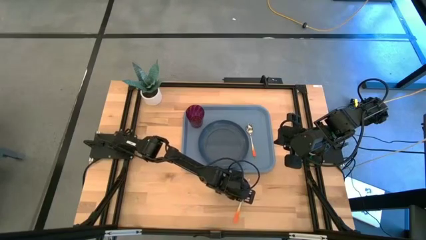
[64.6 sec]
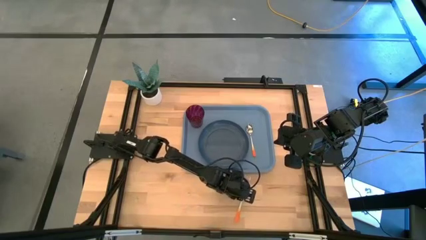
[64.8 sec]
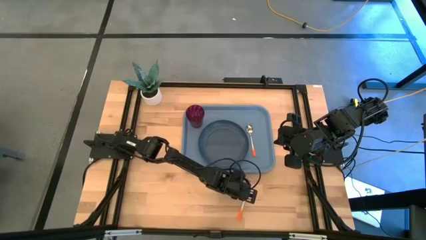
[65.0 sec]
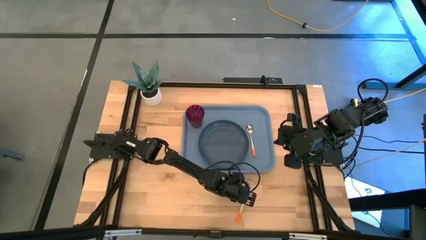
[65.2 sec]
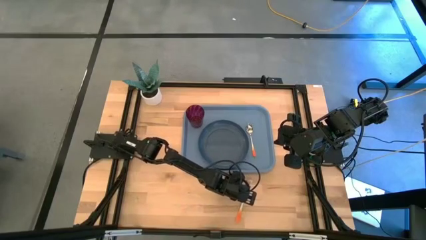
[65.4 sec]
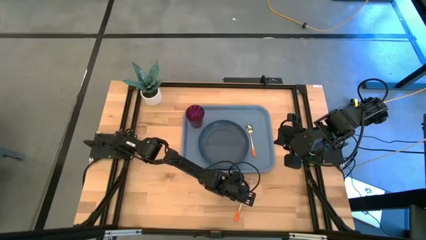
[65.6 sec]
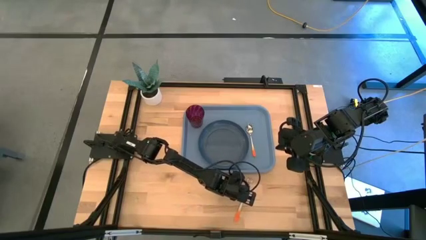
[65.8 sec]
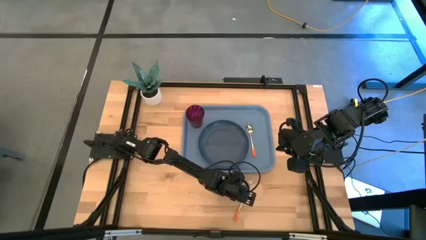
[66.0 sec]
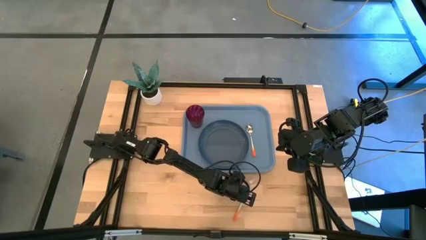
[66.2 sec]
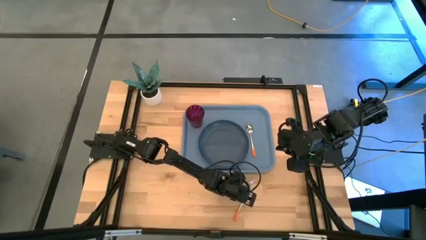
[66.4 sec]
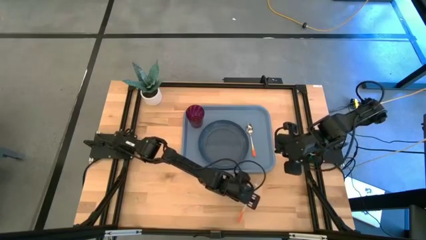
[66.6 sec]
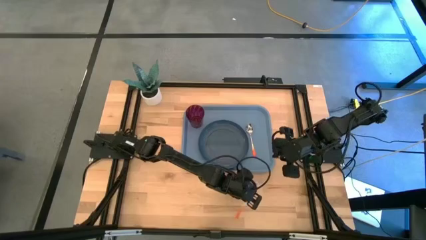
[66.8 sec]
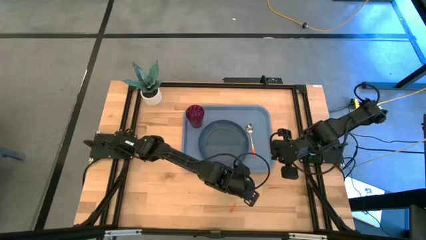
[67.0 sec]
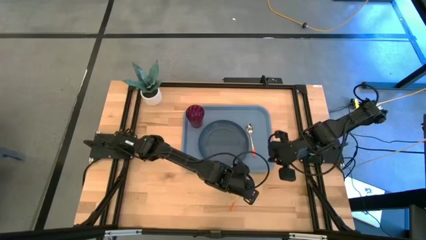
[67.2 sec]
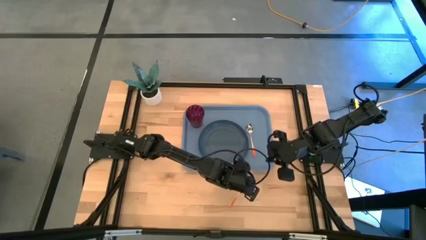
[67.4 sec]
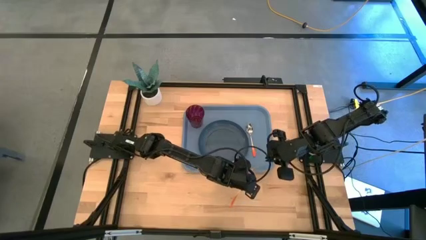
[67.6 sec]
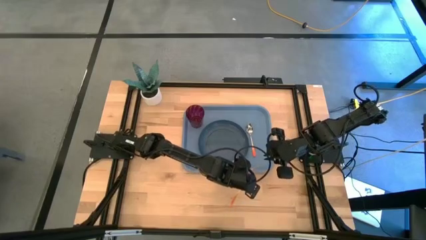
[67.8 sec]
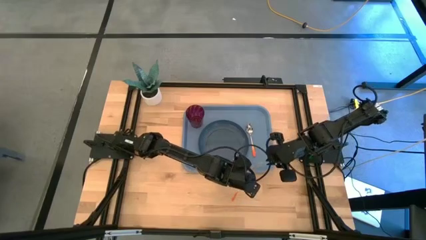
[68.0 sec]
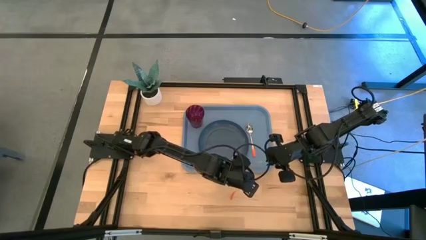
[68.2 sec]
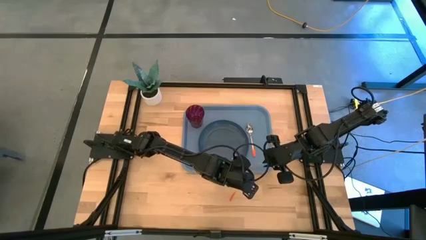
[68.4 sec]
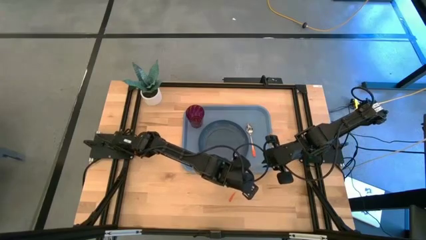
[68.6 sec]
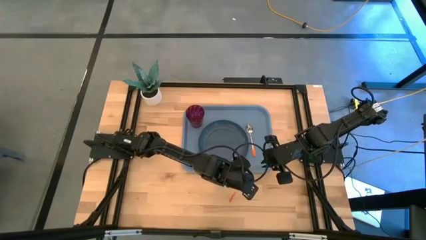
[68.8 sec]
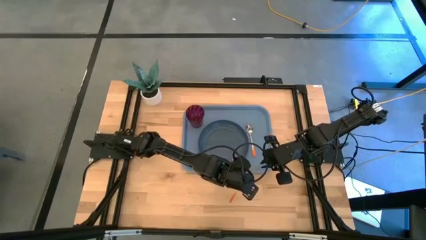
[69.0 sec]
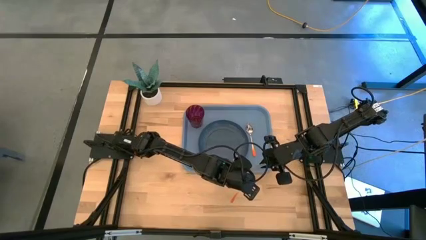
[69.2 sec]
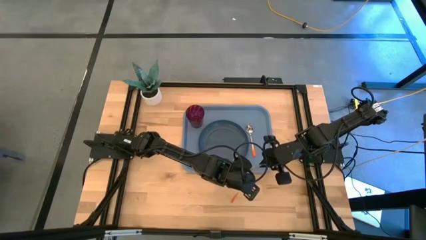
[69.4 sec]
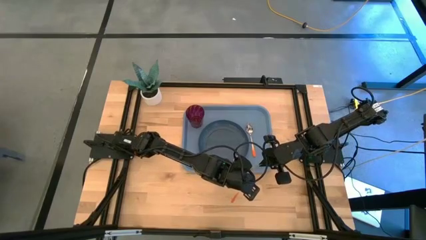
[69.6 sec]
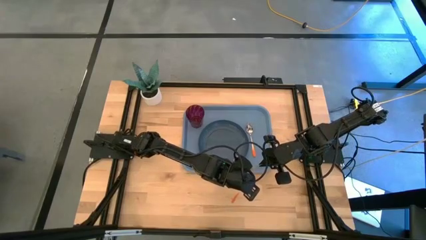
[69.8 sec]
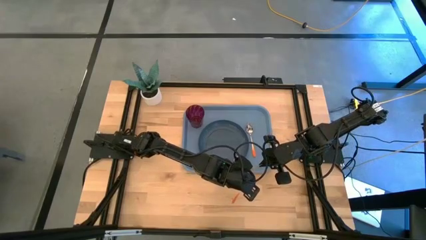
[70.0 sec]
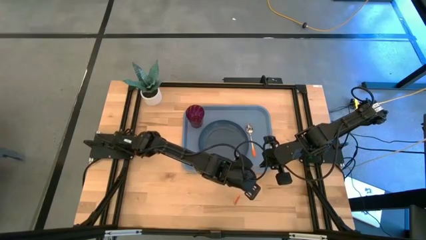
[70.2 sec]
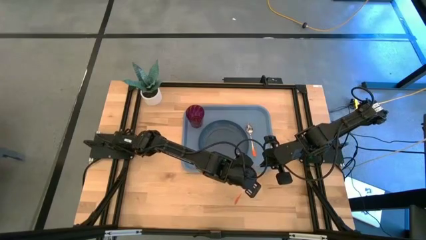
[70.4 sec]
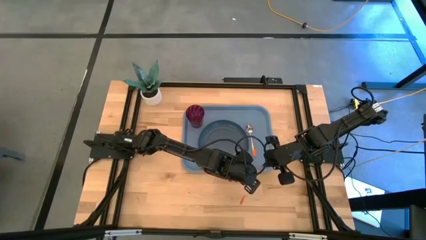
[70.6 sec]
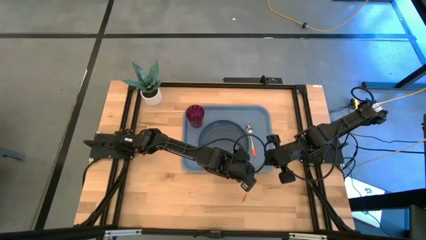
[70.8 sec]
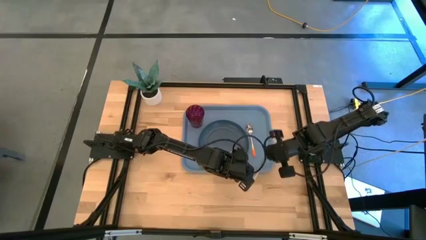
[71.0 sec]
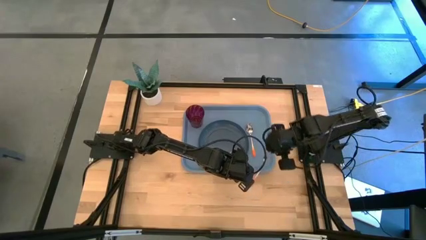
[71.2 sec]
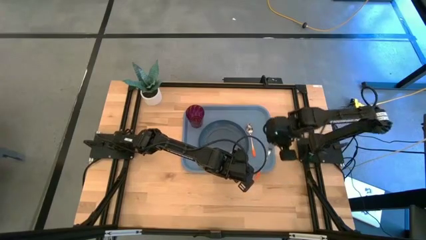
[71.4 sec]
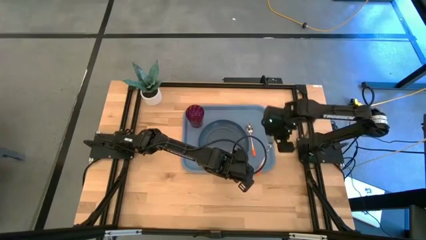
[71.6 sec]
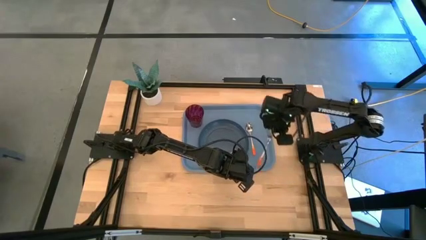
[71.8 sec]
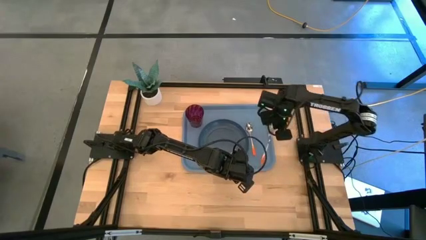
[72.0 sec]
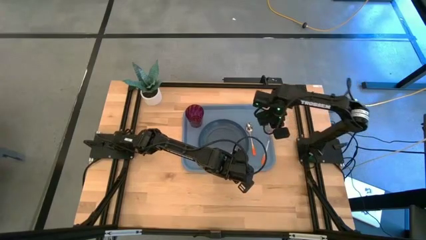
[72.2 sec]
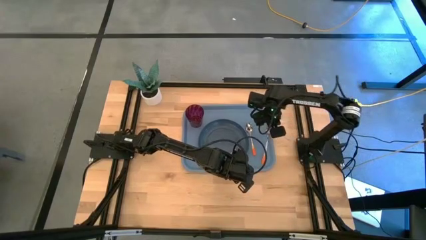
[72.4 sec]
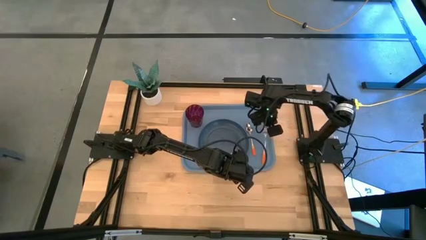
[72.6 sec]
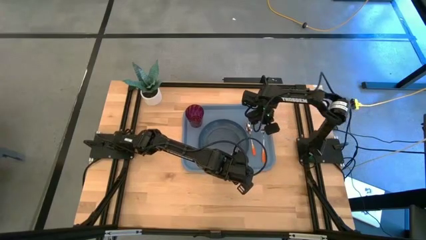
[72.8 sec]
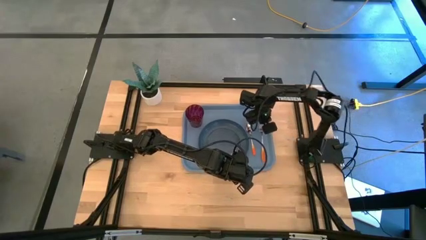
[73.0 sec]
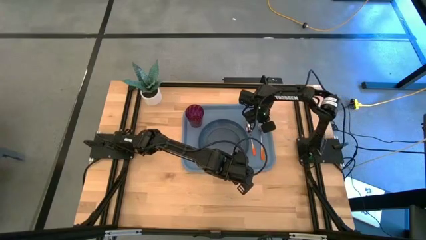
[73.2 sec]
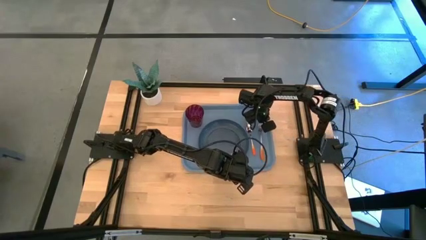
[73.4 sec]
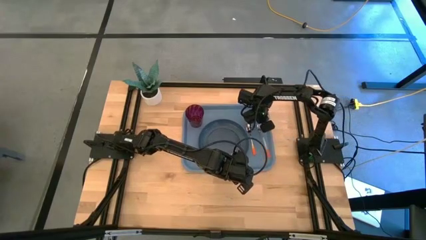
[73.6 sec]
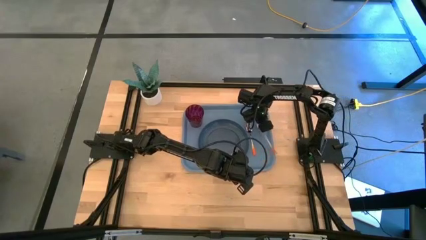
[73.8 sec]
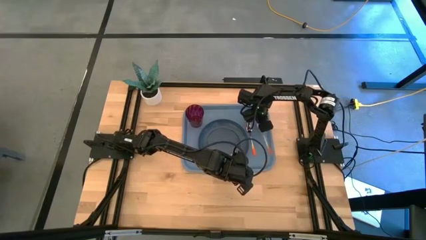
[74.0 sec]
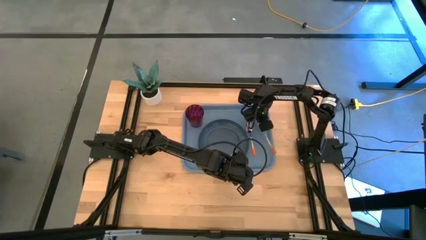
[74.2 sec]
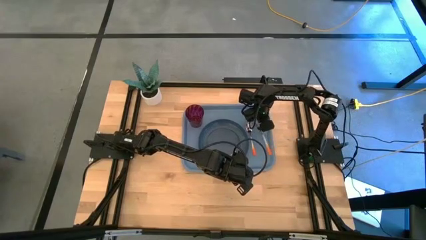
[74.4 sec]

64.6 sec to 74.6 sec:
Task: Pick and place plate/cup/fork/spoon on tray
Put the orange fork to the right of the orange spoon on the light blue tray

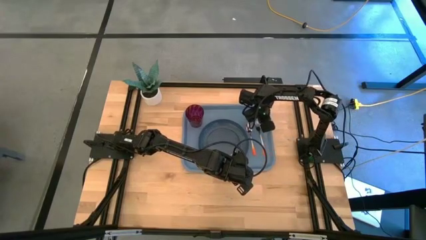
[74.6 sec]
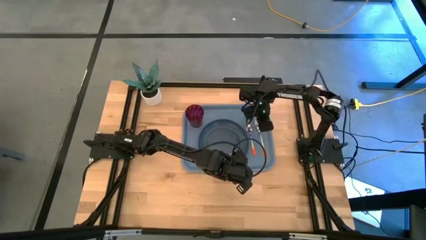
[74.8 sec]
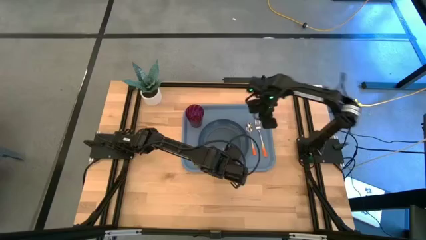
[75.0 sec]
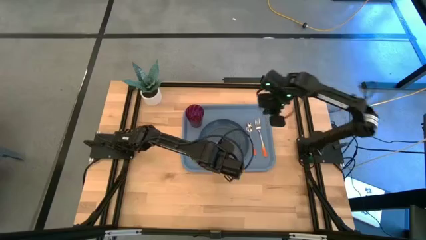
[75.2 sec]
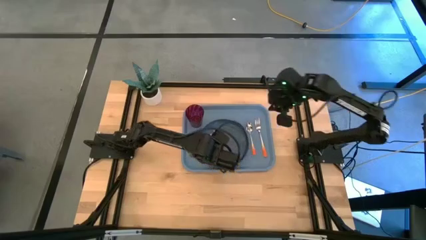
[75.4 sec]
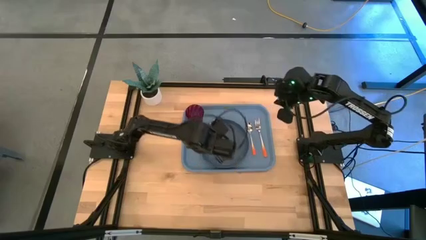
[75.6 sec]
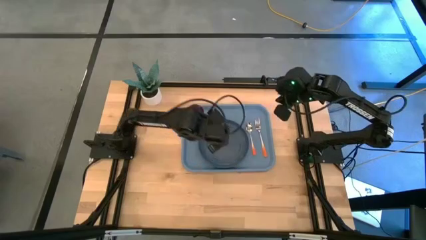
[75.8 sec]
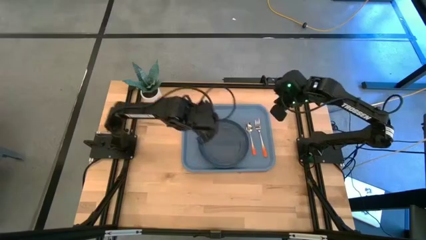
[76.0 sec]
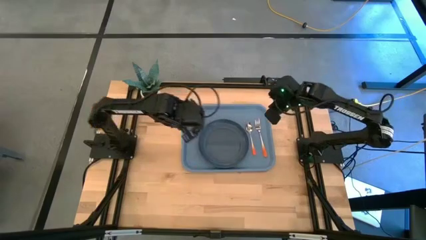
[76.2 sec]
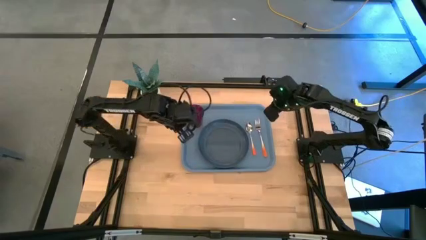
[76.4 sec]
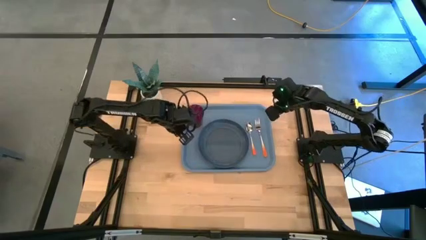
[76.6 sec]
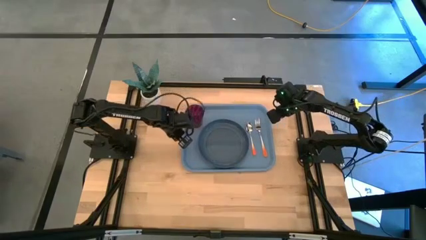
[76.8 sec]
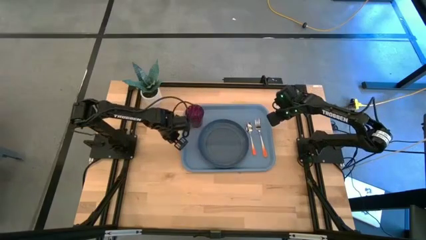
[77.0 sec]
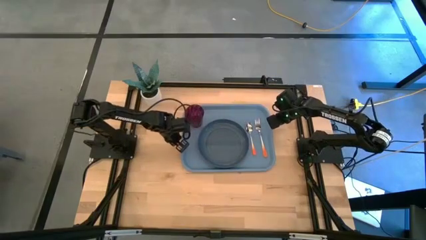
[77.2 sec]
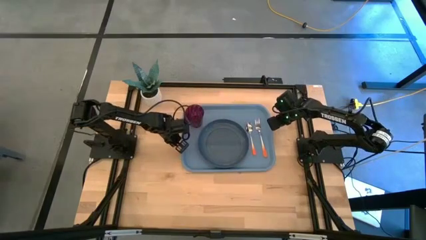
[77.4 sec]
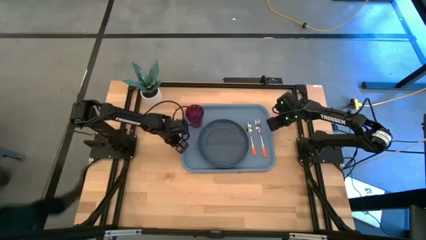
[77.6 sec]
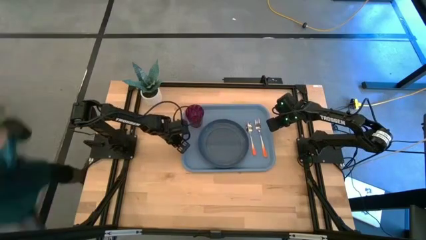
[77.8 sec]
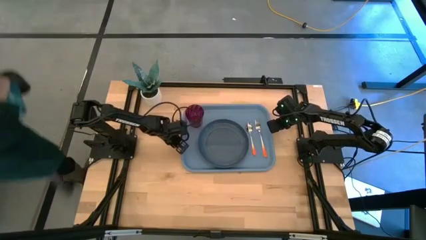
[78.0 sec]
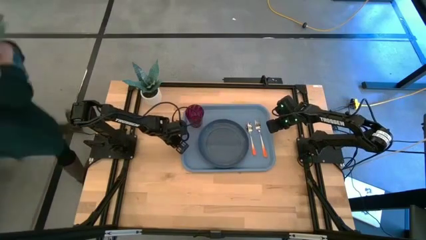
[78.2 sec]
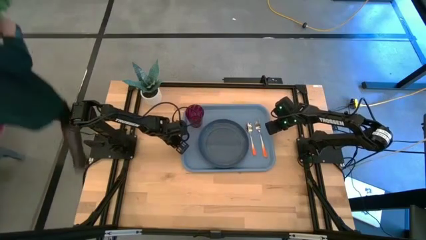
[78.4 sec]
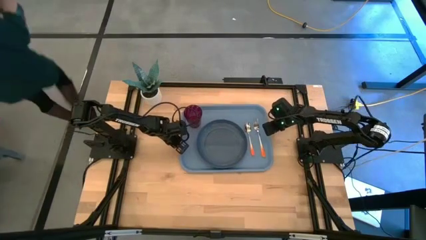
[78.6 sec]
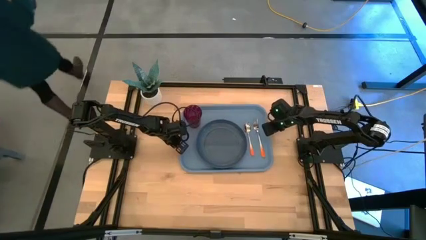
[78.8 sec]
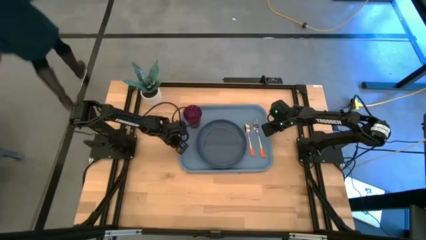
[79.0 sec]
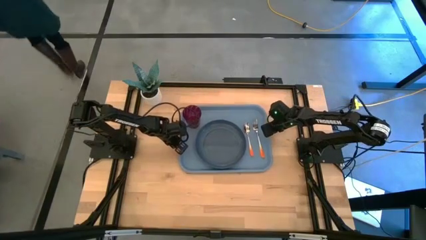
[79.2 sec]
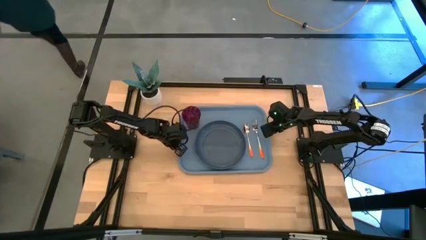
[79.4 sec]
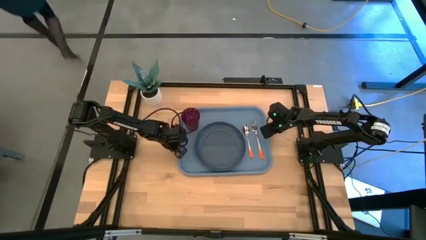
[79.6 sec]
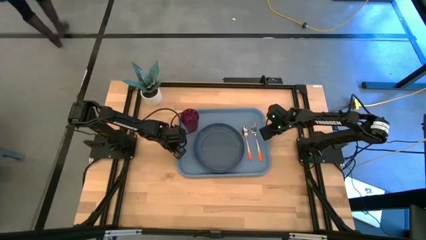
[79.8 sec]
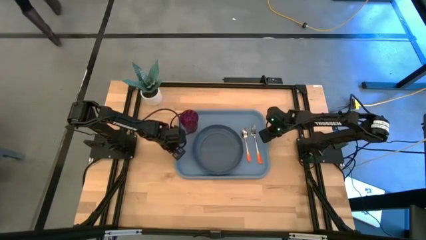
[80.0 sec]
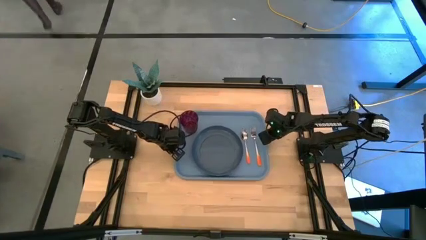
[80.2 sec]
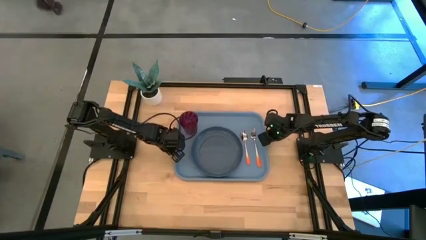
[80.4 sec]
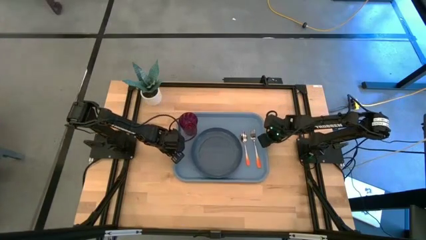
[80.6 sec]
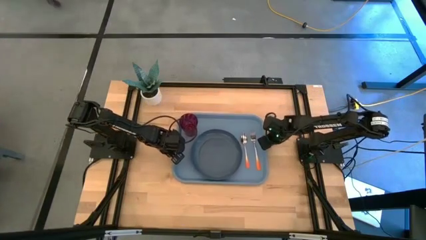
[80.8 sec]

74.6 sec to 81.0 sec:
Move the light blue tray to the center of the table
